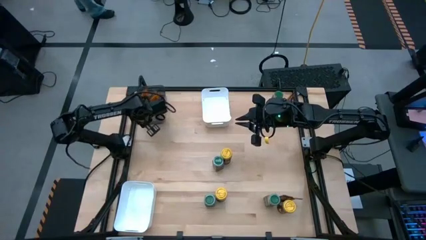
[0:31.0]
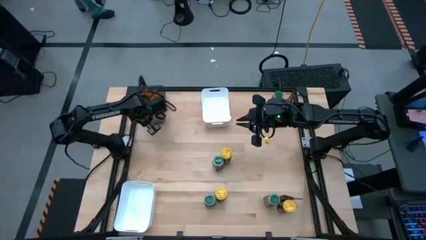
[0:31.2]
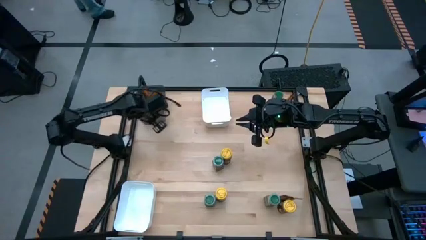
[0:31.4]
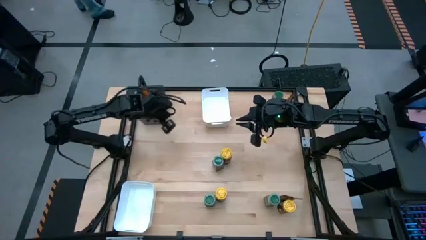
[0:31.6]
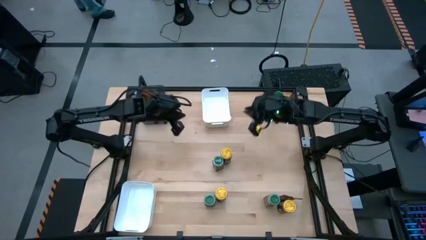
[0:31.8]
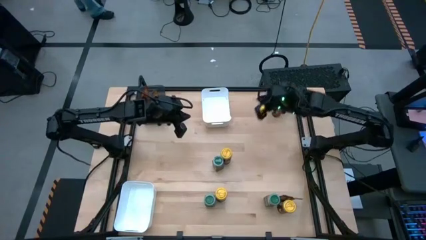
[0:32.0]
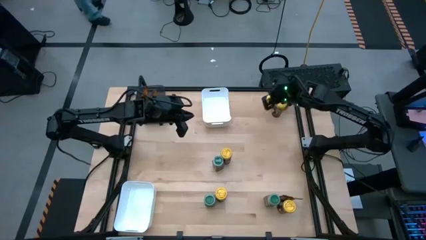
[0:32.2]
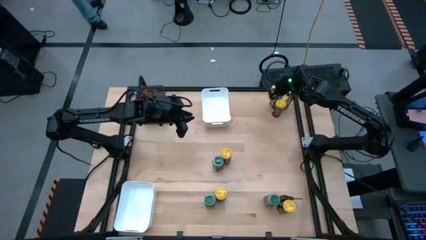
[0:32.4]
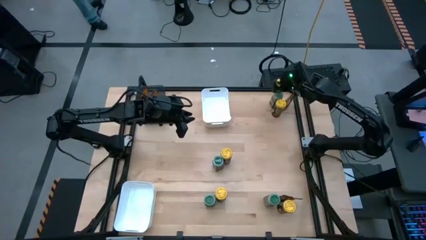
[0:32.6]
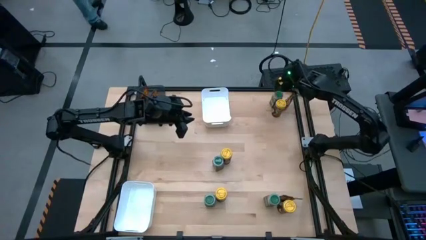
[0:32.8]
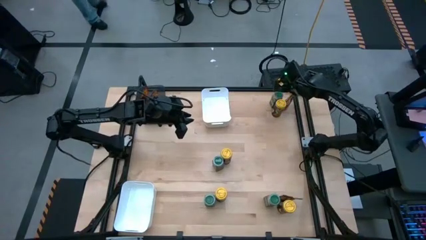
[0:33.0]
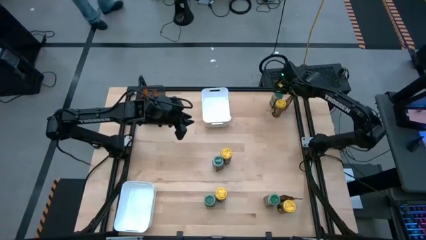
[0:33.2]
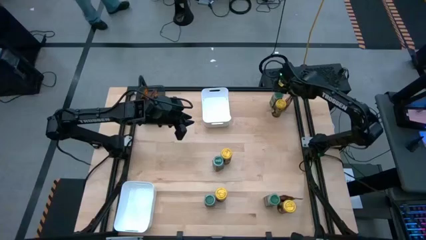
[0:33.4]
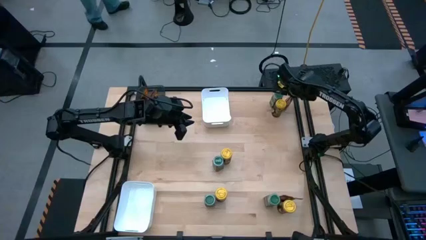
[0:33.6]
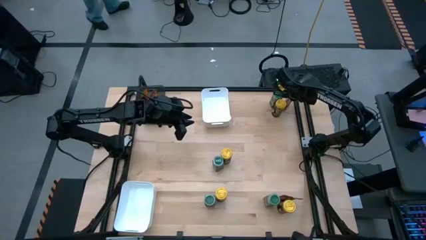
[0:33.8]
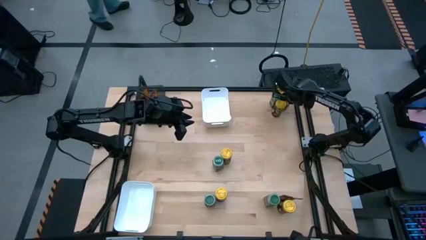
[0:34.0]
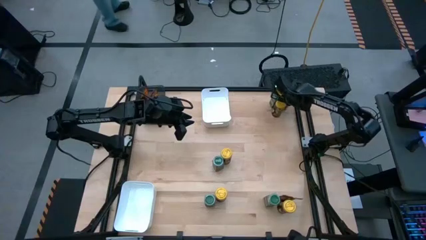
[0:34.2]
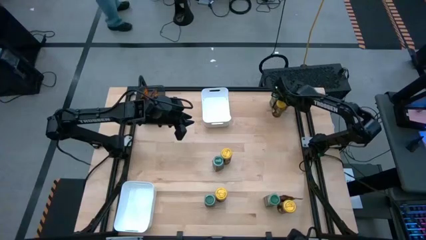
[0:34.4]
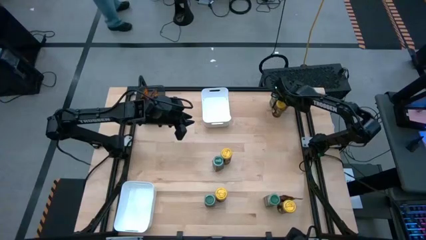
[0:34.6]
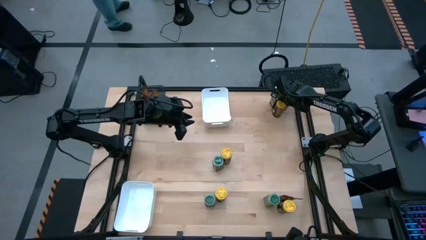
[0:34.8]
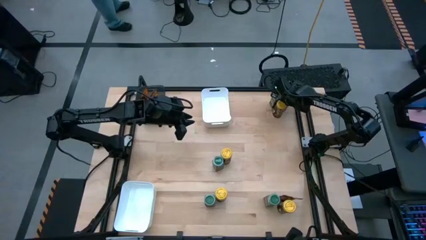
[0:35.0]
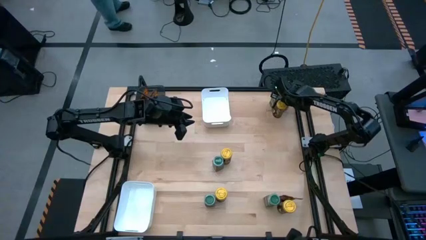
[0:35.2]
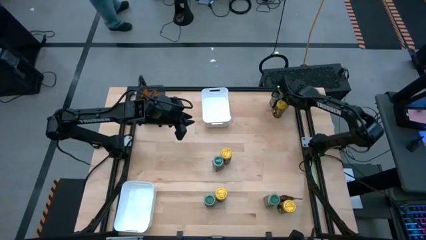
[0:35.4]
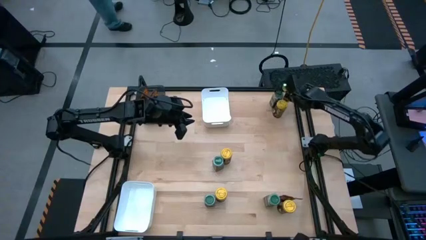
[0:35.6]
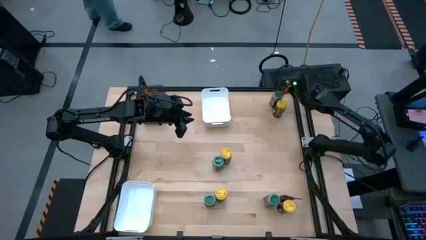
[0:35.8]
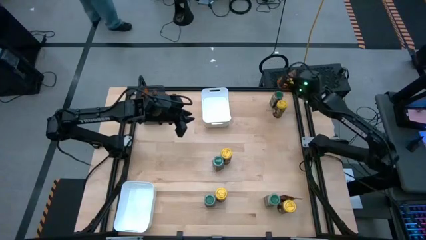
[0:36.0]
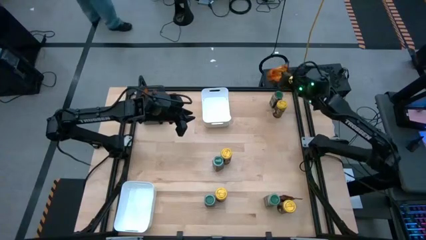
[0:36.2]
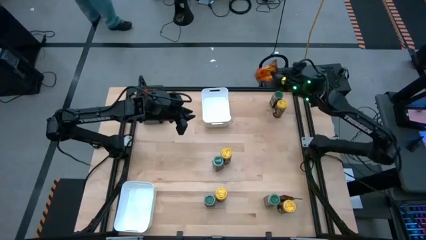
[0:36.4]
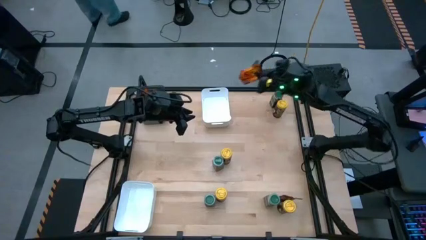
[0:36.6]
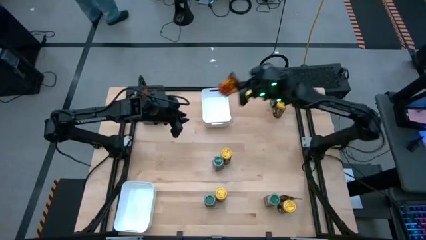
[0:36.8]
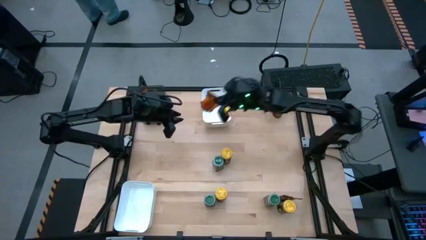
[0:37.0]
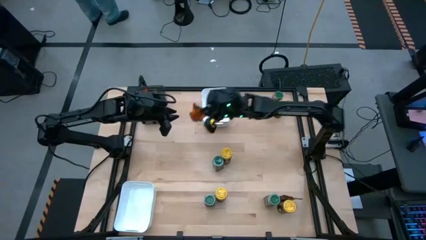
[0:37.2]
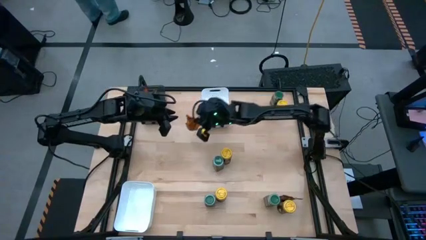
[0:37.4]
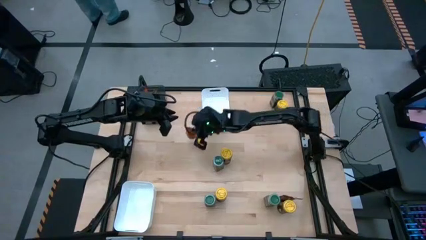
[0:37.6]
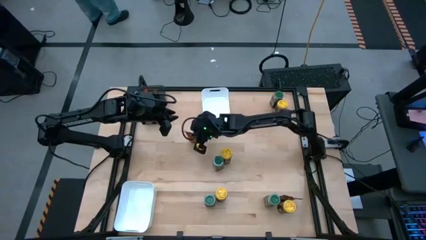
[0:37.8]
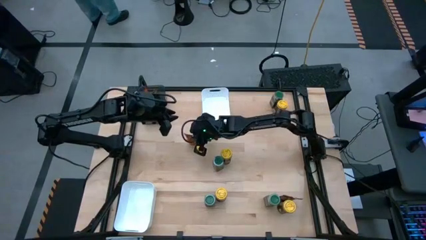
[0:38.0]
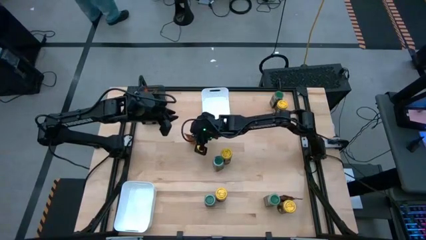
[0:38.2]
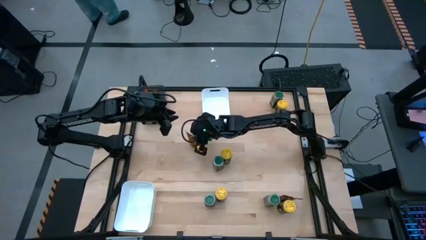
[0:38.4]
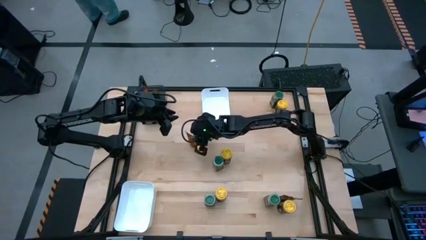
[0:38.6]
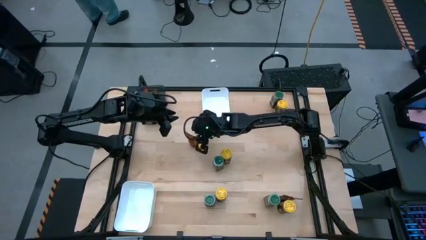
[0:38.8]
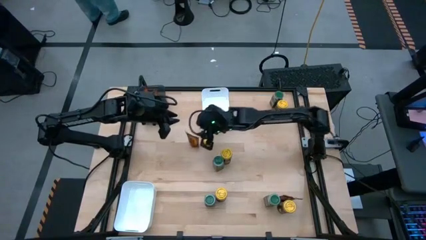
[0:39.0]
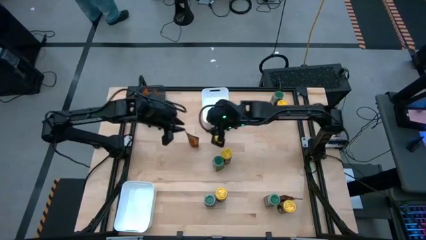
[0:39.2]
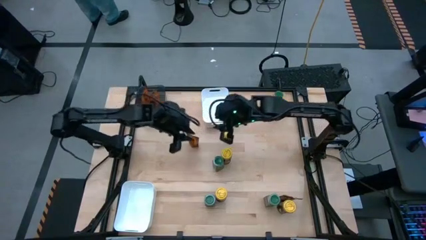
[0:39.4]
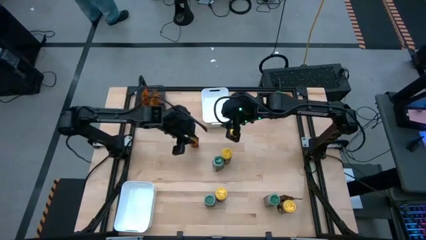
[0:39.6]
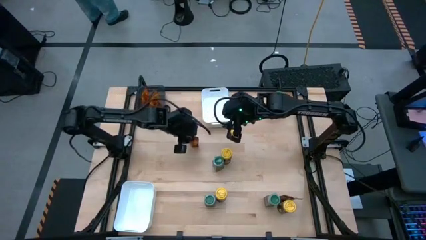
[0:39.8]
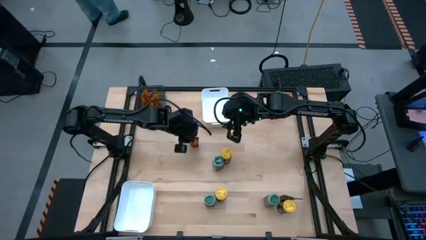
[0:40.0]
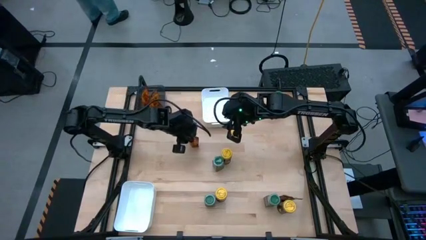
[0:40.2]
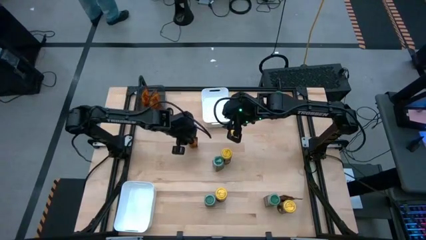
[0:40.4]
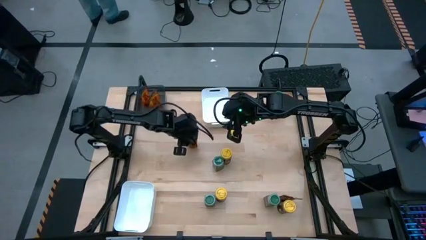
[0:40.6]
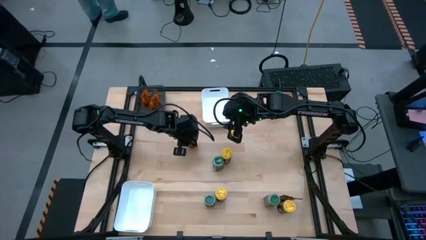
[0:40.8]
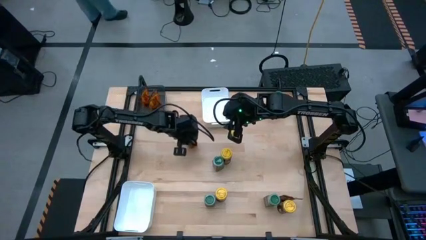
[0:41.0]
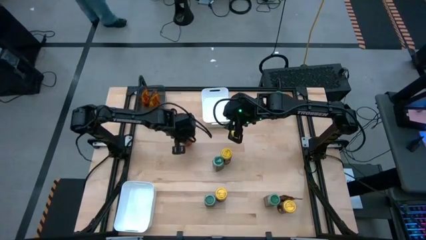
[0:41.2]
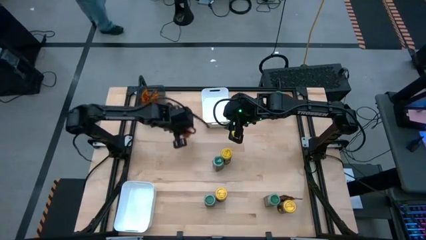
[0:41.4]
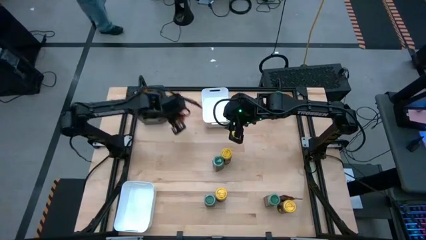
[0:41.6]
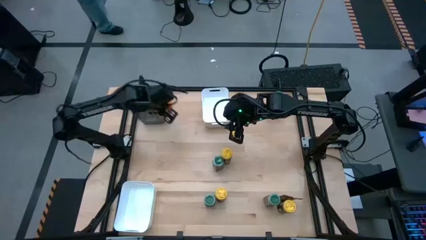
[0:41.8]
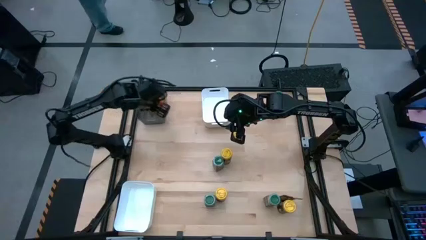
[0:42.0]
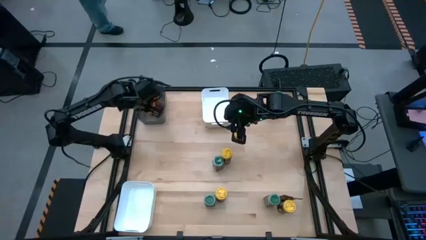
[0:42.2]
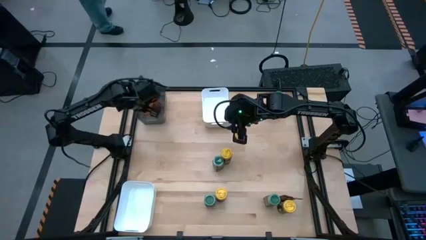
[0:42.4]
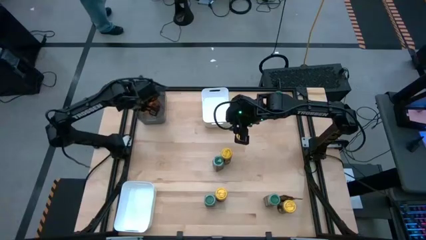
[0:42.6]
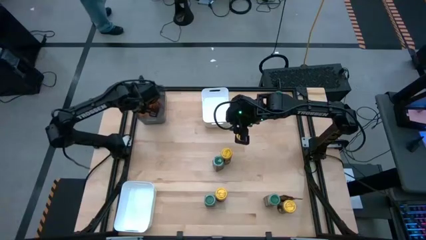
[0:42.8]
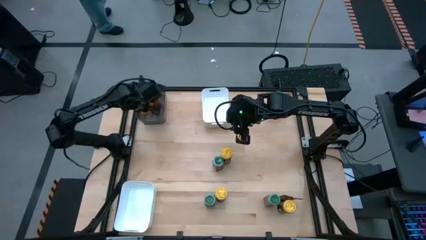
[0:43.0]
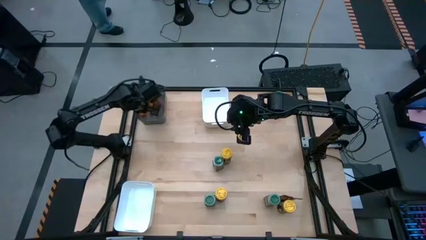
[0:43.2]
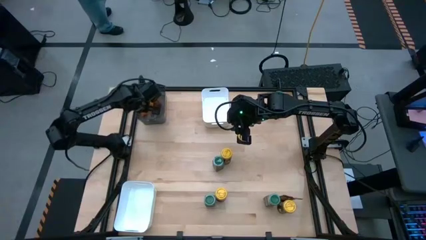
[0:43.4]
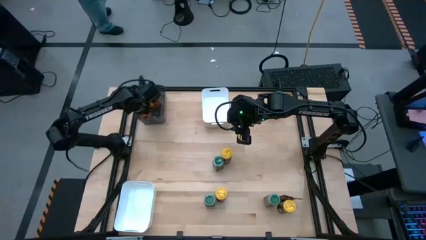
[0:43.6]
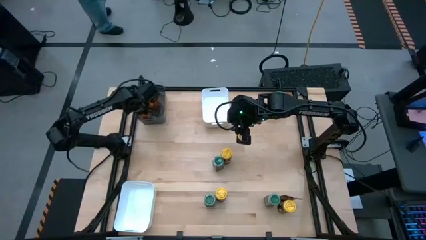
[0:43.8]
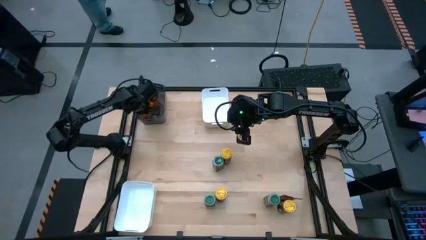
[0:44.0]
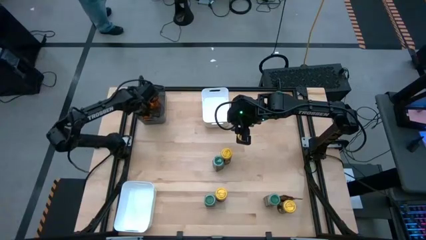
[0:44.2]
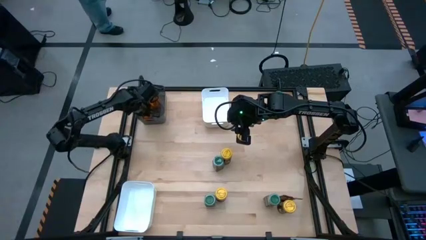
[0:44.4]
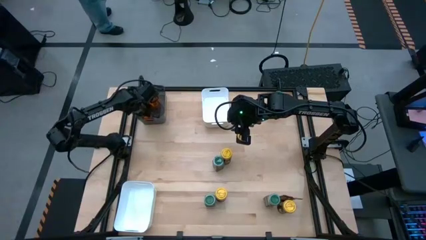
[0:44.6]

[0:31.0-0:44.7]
Task: Sort spices by type
Put the top orange seasoning pack into the black bin

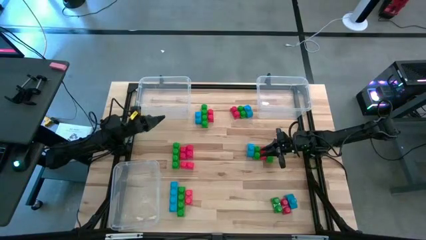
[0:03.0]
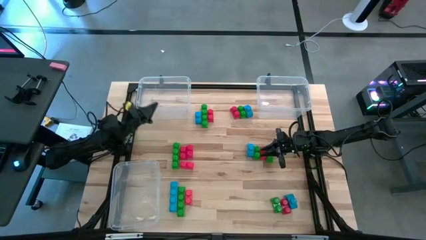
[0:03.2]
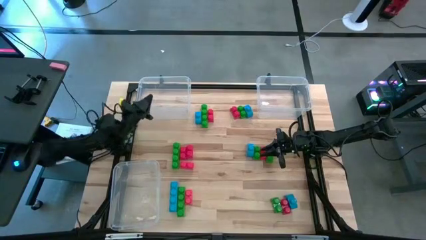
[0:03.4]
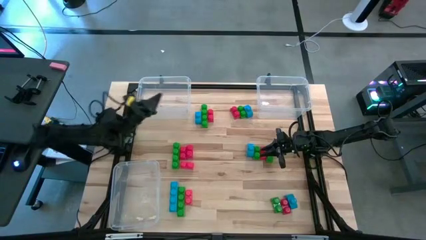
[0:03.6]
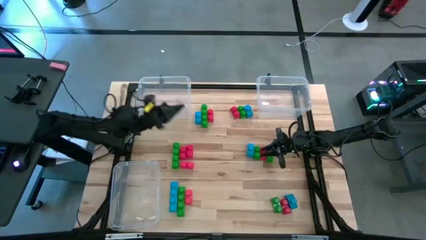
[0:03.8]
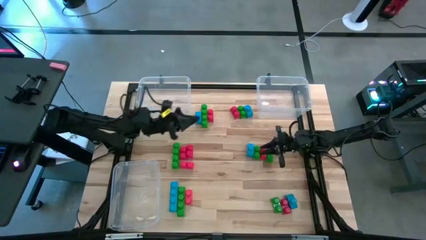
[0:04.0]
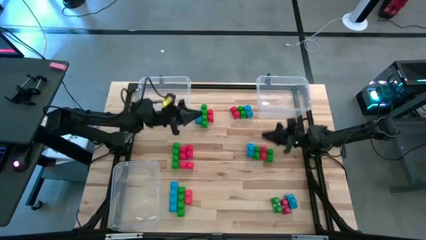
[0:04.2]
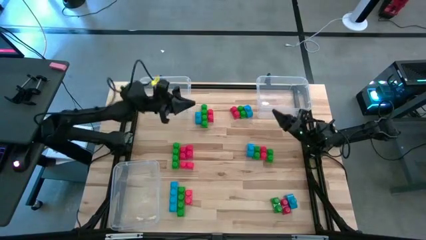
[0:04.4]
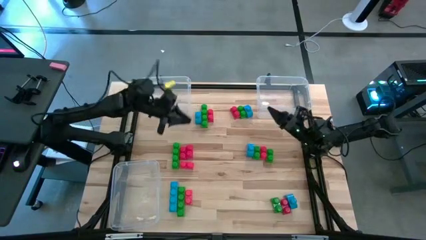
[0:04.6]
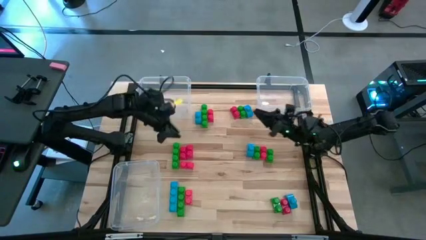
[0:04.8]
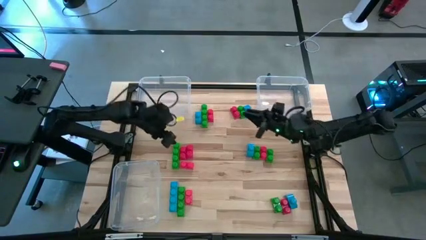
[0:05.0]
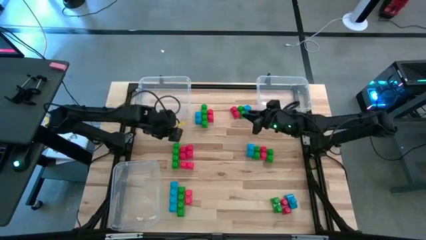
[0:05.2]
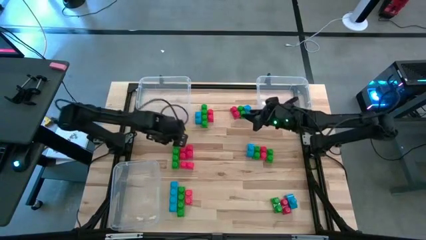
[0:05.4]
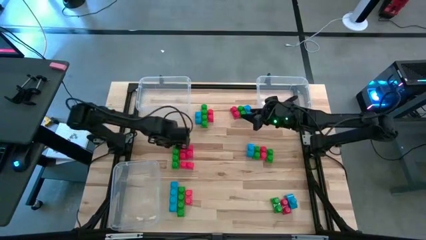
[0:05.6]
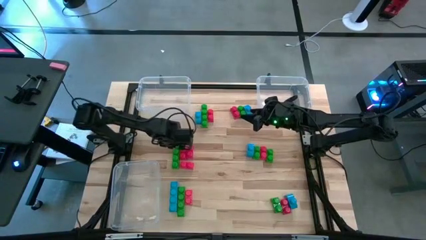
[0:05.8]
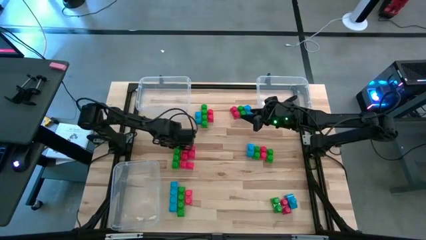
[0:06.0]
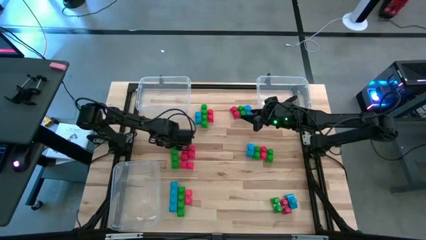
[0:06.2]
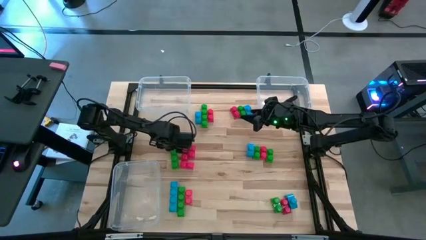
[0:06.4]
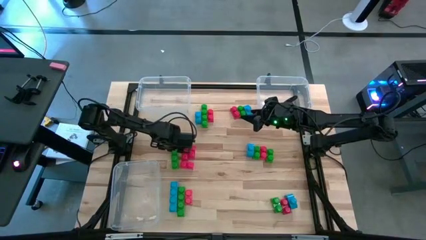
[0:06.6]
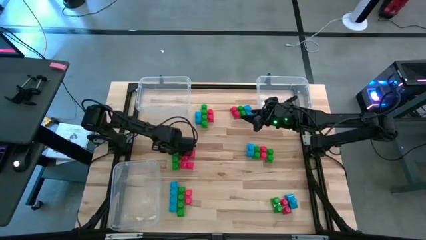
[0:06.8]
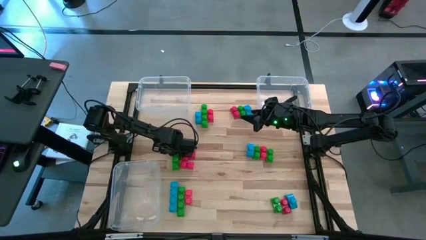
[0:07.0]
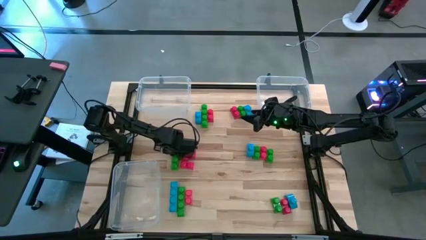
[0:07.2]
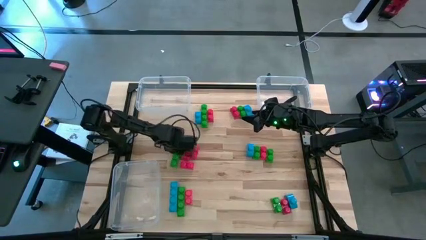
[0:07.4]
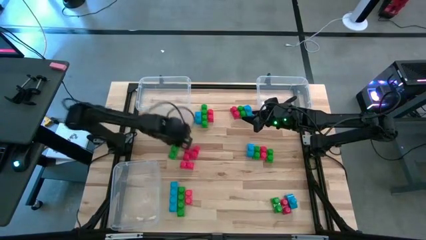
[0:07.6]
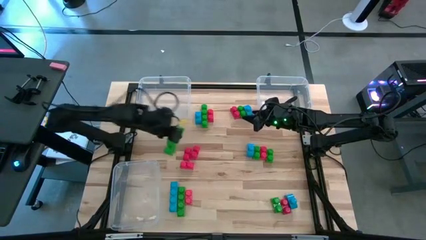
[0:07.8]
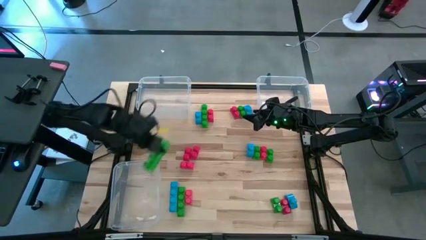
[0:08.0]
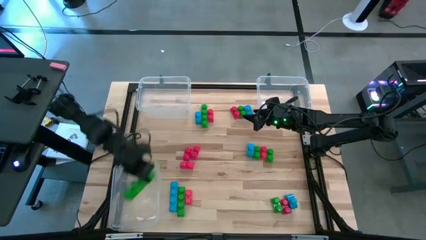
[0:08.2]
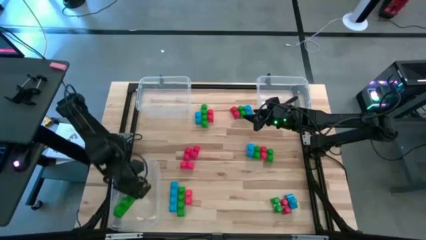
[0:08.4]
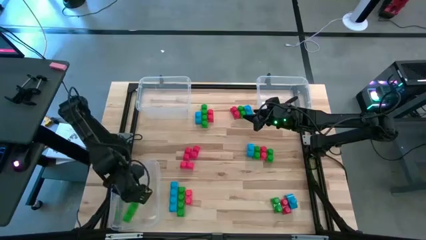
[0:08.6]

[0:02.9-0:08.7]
Task: Sort blocks
Put the green game piece into the bottom left transparent bin
